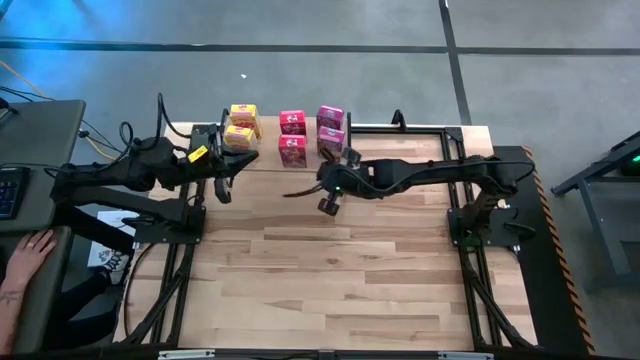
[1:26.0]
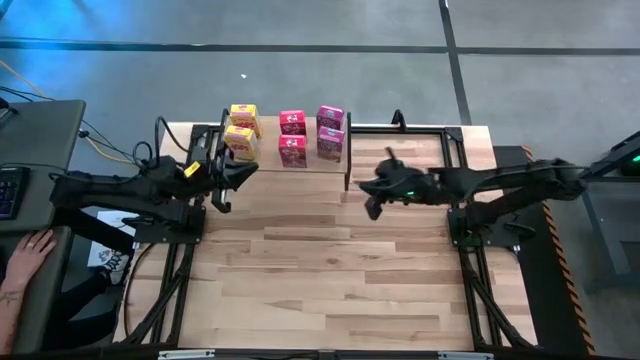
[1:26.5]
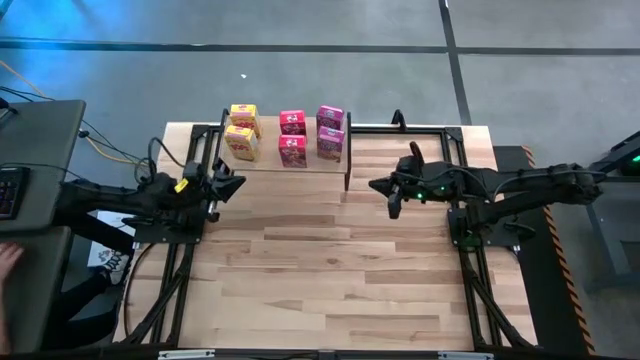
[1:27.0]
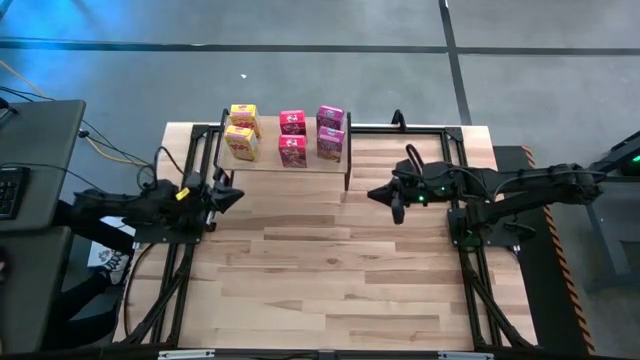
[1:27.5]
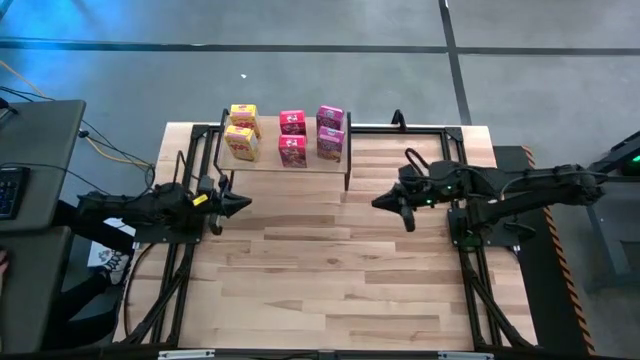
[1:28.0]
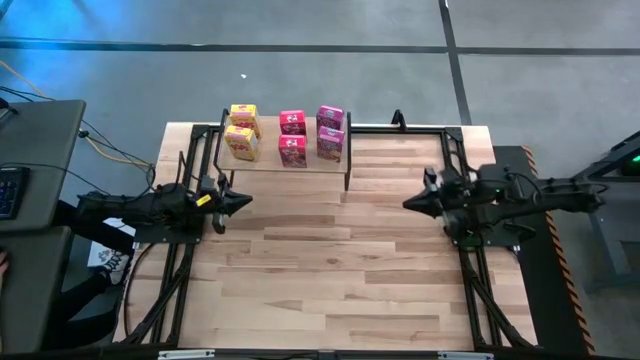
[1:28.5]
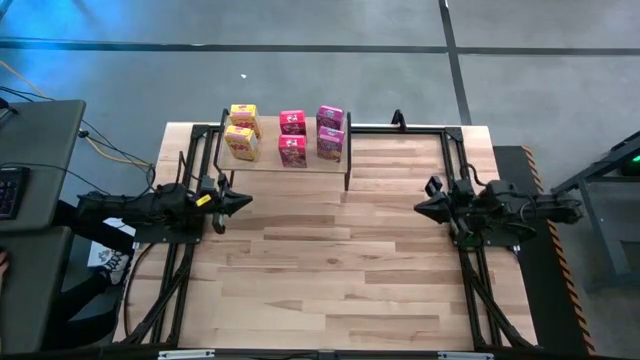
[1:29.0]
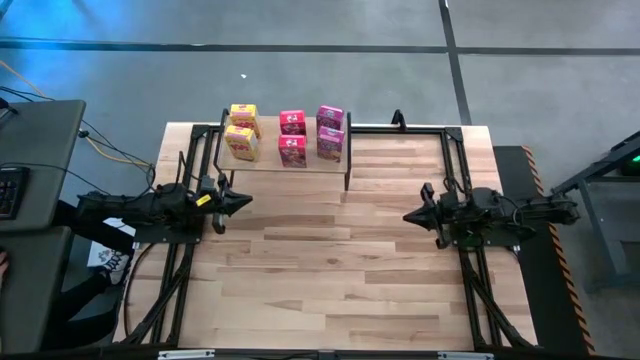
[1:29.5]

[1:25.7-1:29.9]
Task: Stack cereal on shelf
Return to Home Position

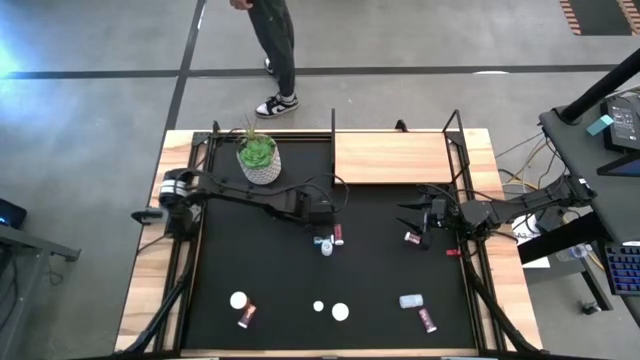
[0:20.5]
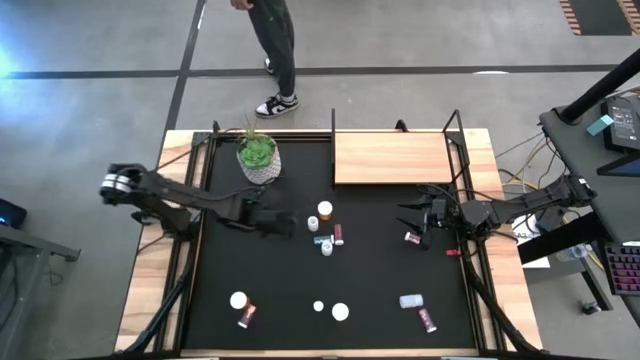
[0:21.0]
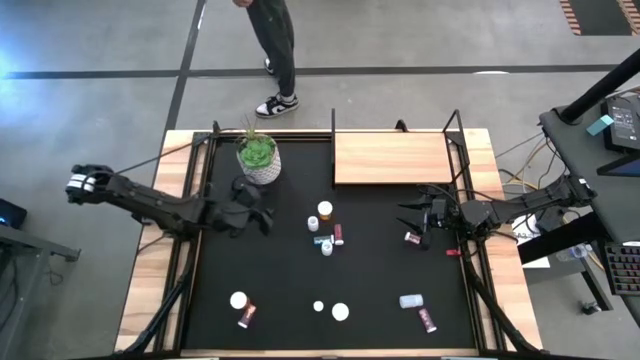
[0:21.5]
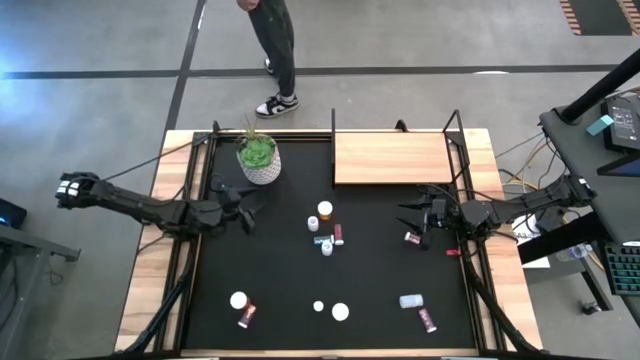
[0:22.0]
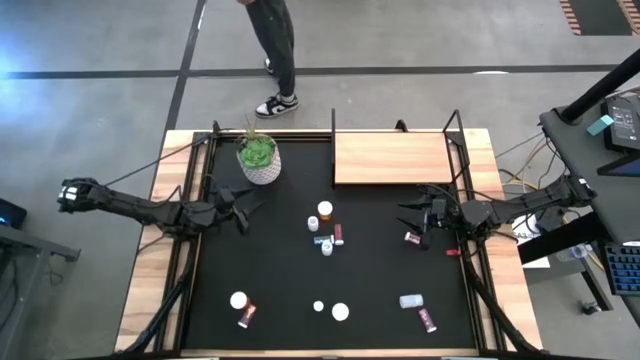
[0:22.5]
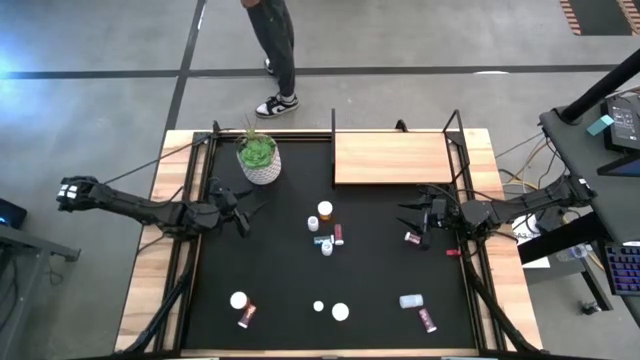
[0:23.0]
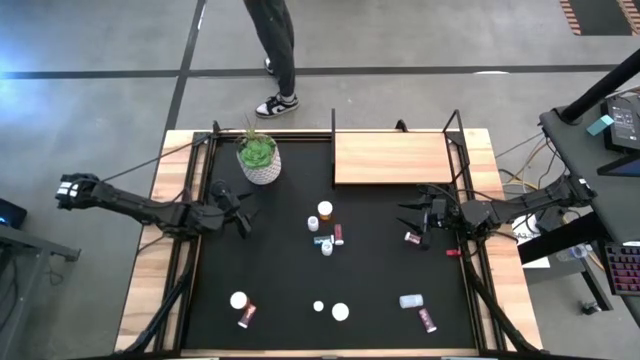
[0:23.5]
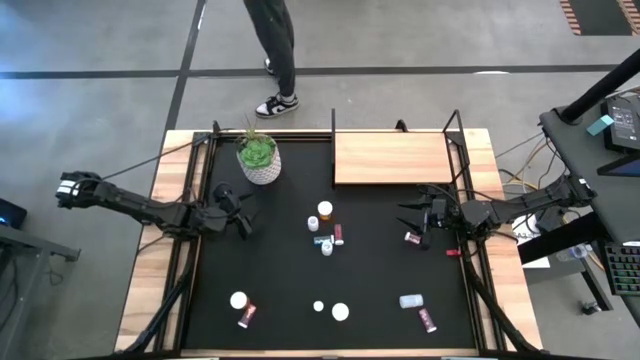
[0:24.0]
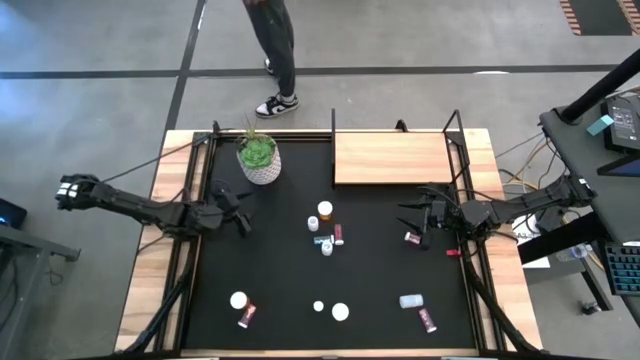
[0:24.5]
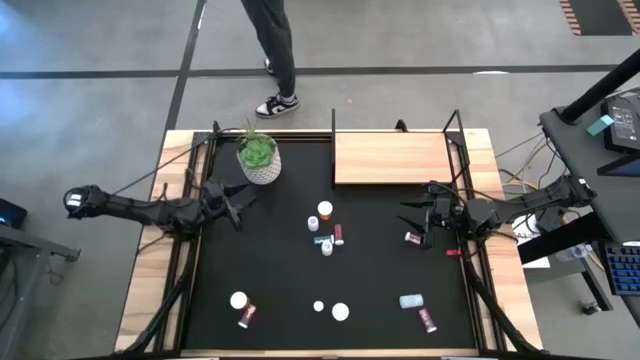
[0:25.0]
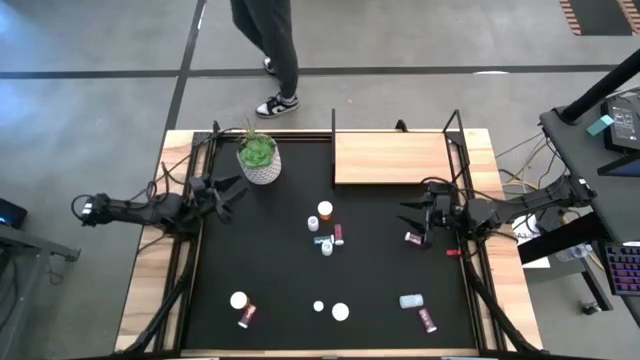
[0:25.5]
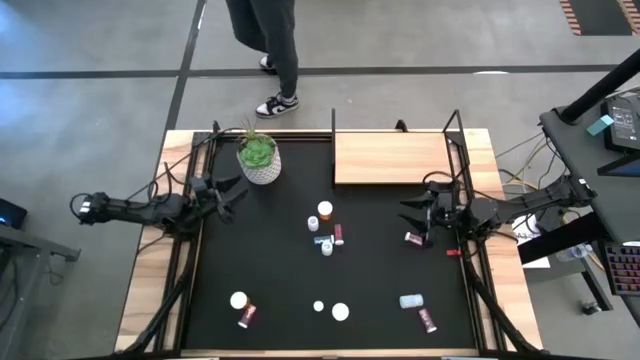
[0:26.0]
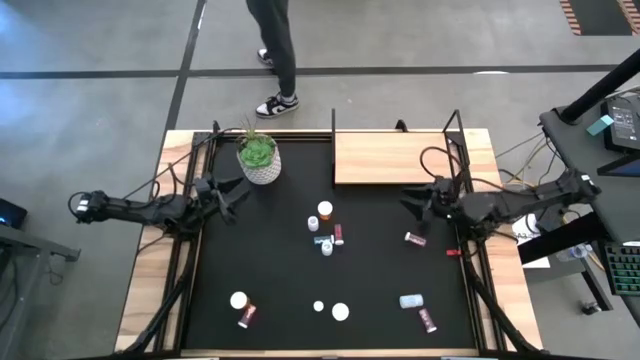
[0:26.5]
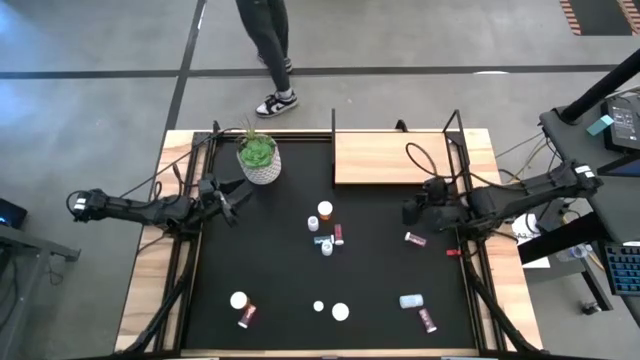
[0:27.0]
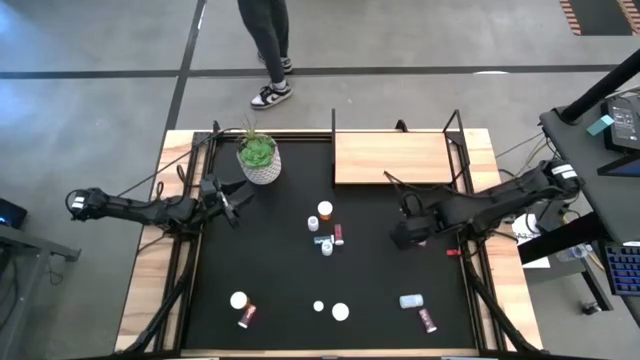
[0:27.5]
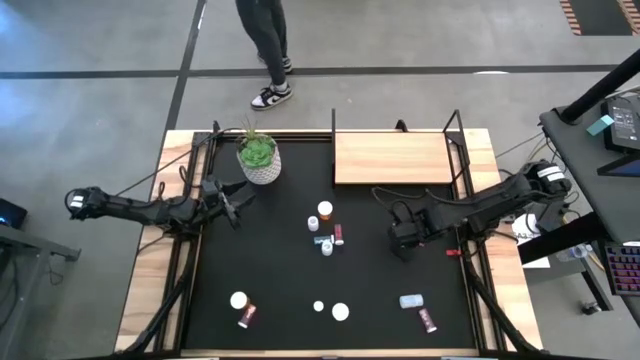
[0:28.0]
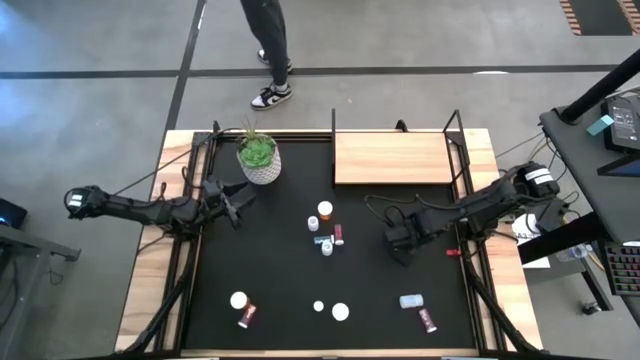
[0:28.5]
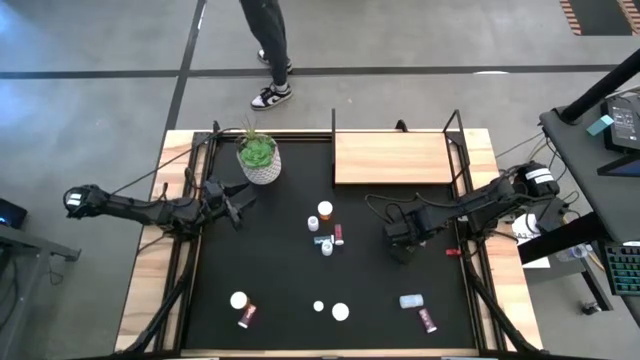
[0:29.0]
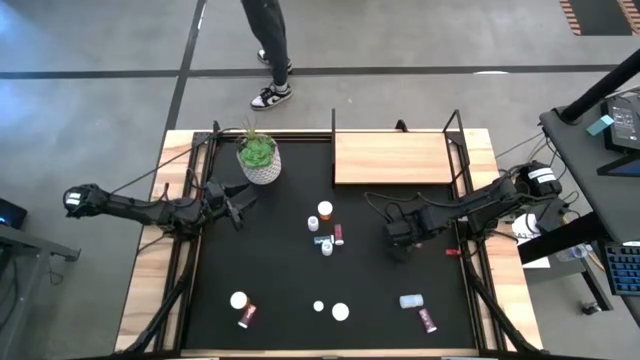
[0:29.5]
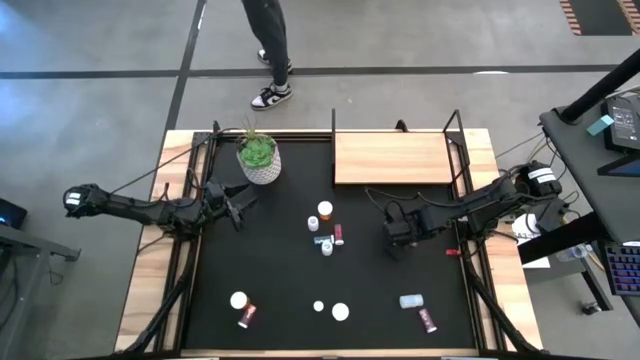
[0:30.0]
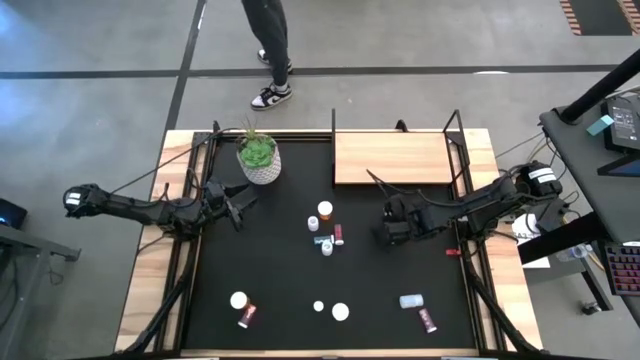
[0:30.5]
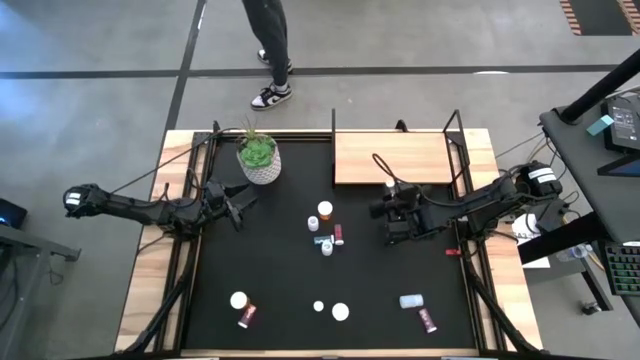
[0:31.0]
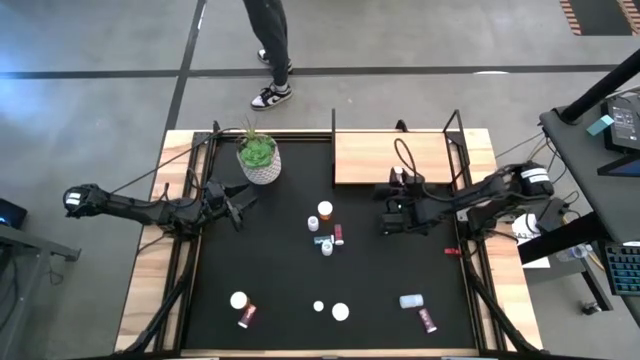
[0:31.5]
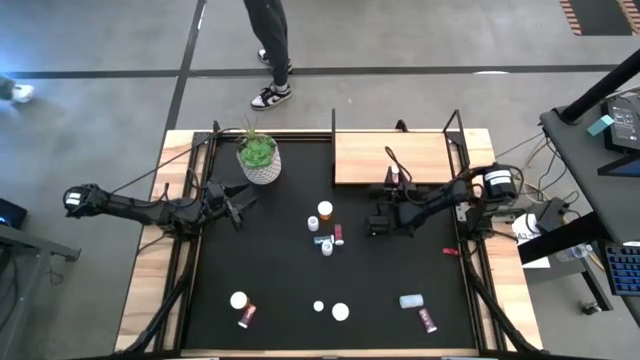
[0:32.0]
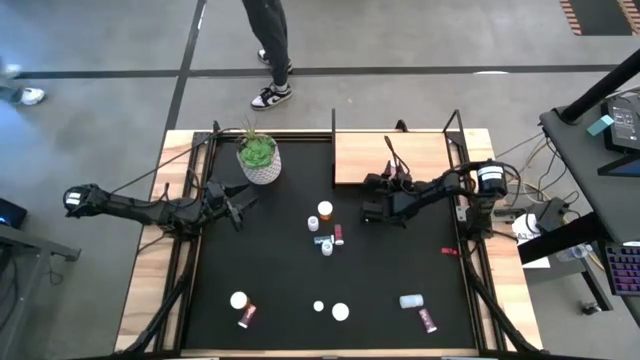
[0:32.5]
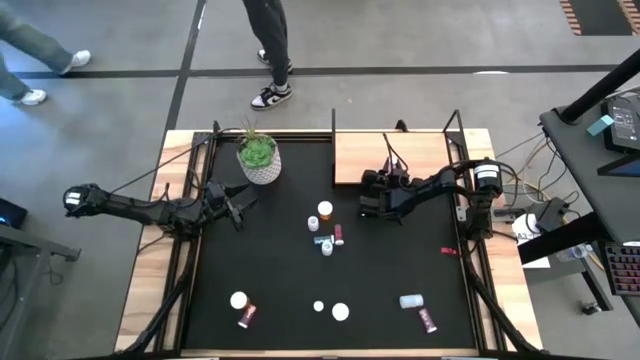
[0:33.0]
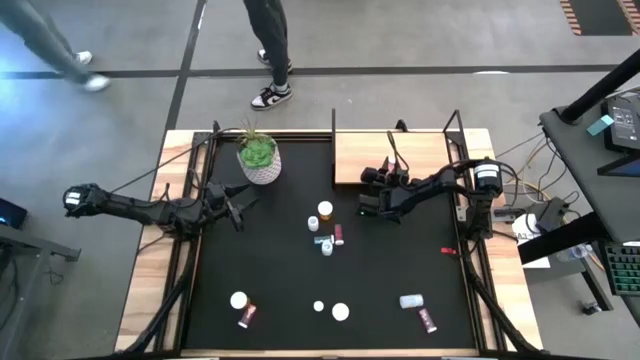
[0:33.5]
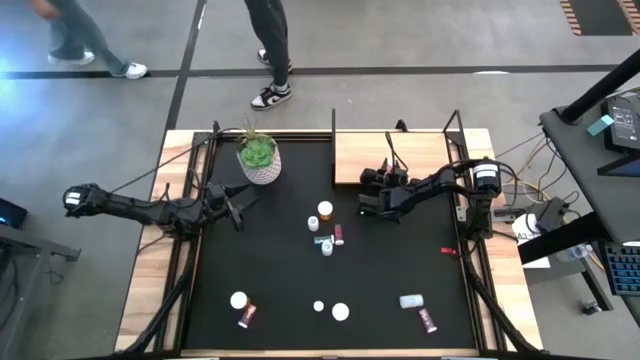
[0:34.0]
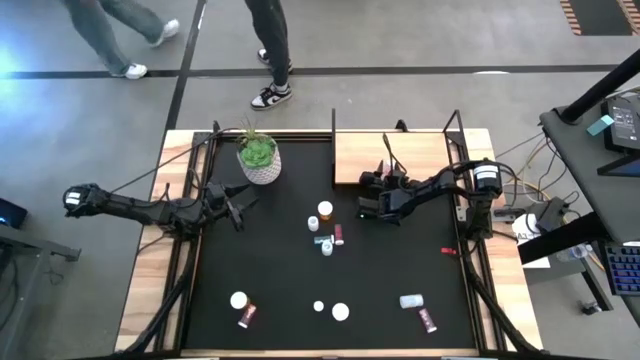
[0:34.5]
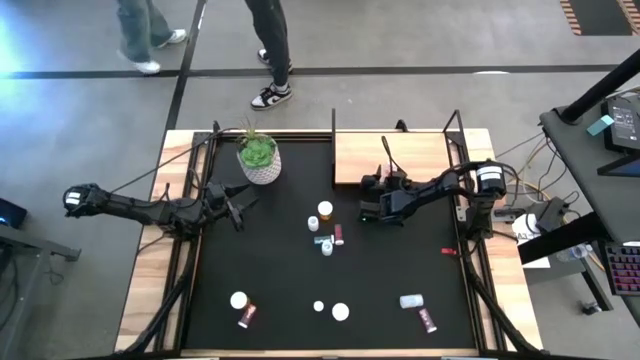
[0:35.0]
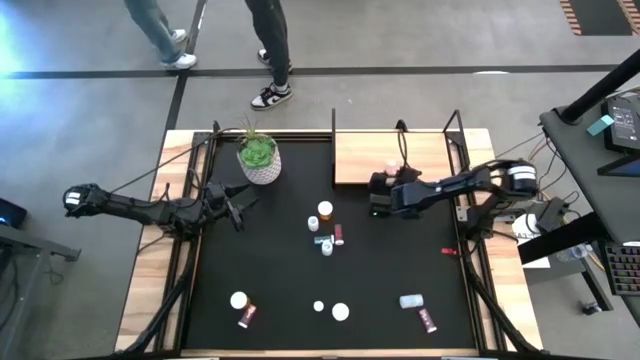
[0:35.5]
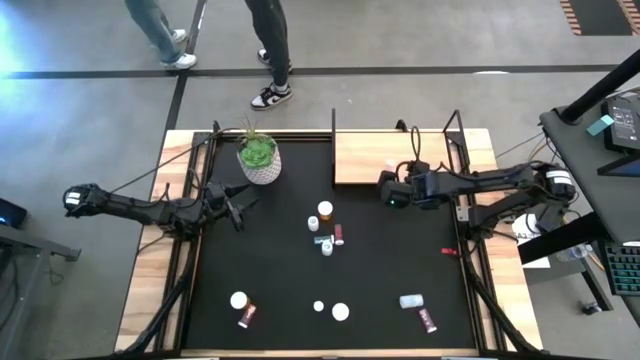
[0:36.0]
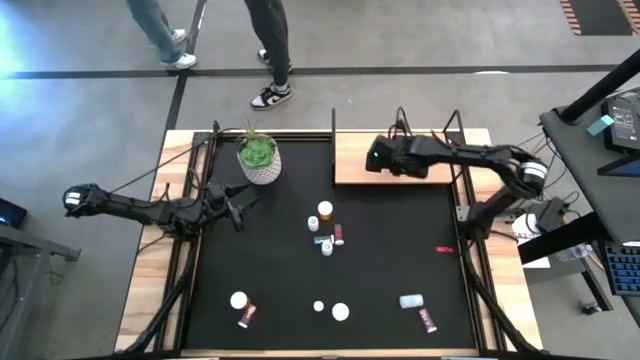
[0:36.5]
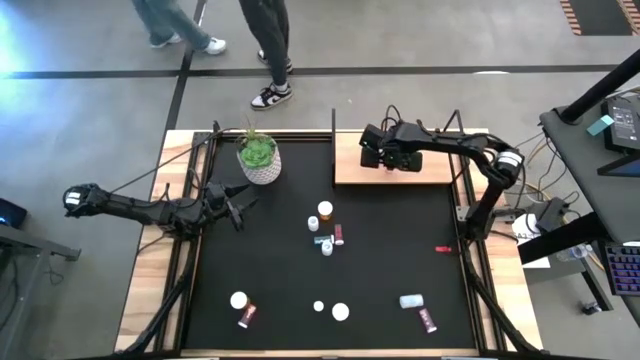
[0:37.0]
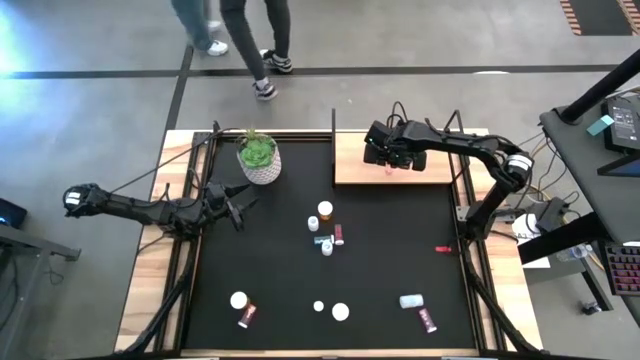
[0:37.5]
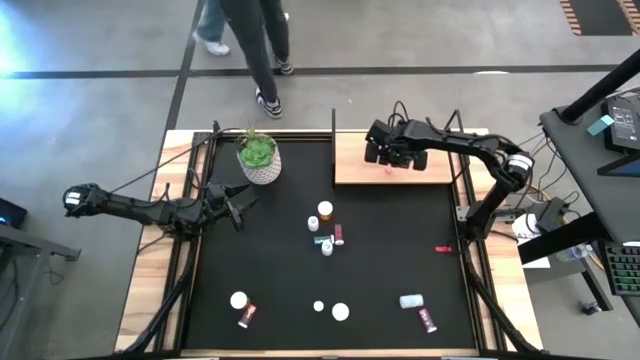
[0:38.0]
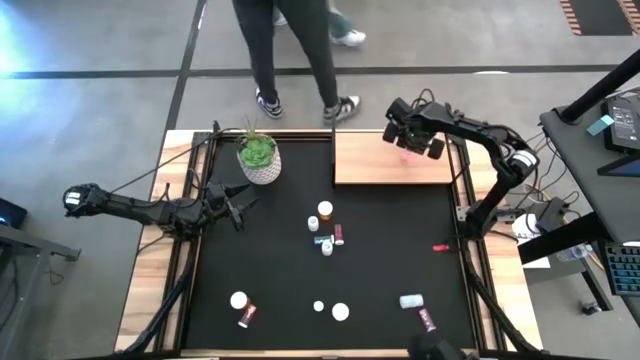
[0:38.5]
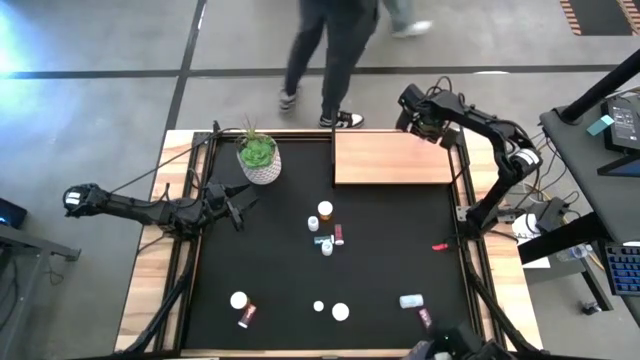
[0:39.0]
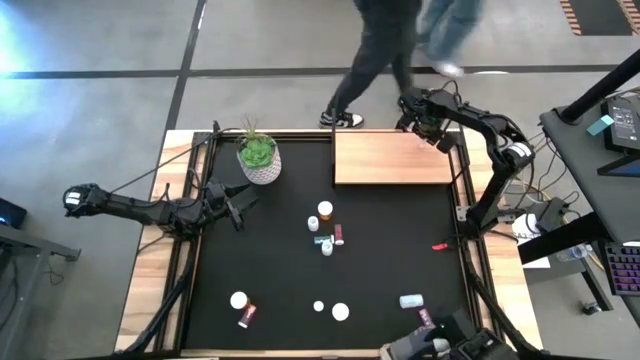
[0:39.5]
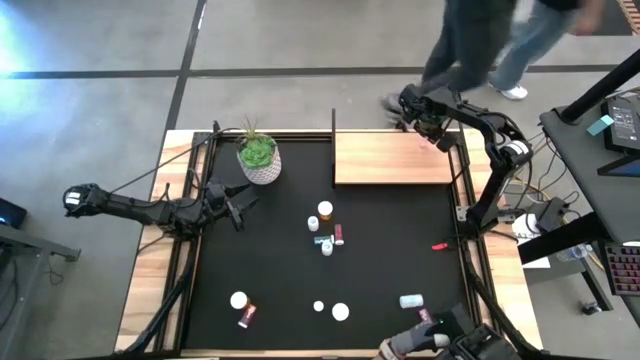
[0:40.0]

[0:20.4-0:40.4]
Task: Pick and place medicine bottles onto shelf by color
Put the top pink pill bottle on the shelf
